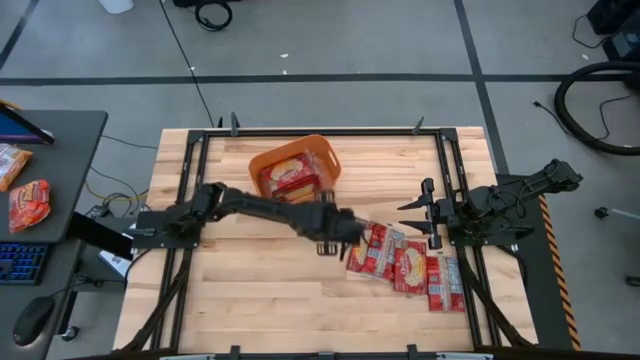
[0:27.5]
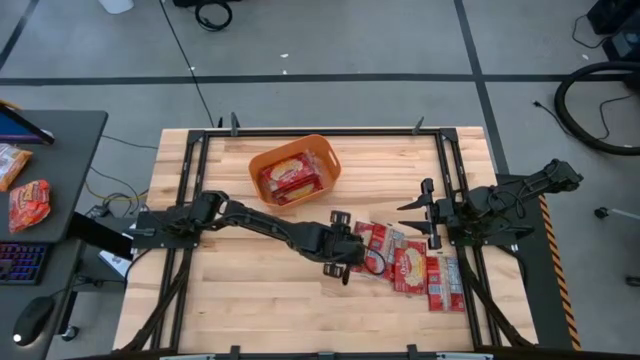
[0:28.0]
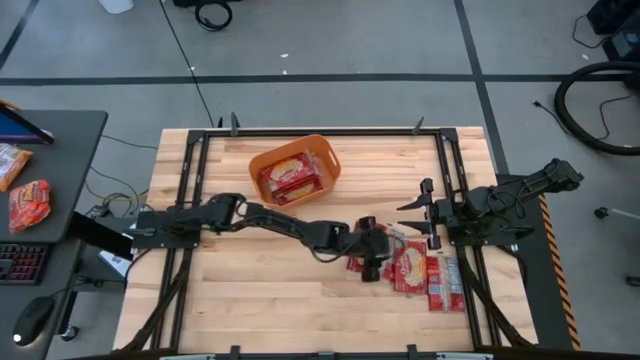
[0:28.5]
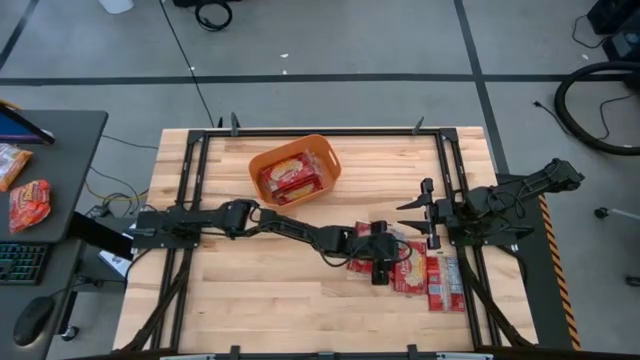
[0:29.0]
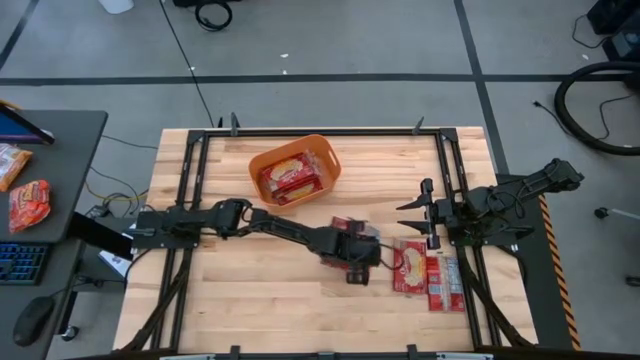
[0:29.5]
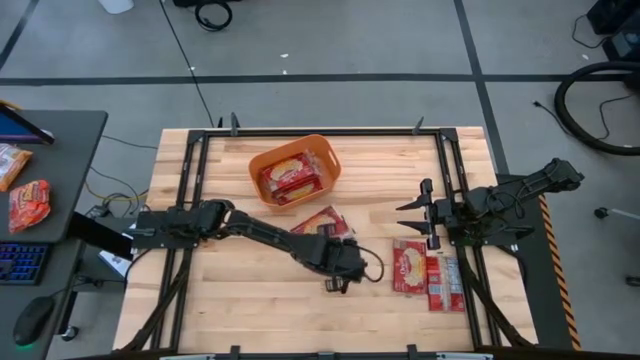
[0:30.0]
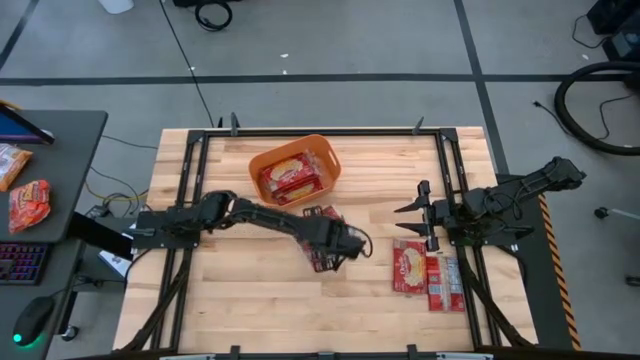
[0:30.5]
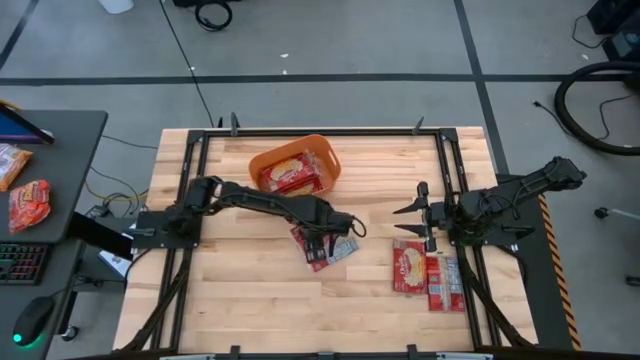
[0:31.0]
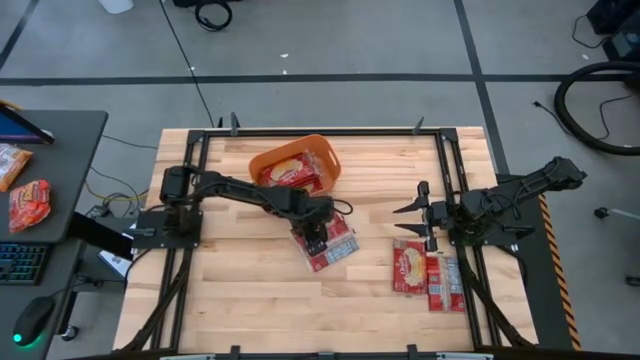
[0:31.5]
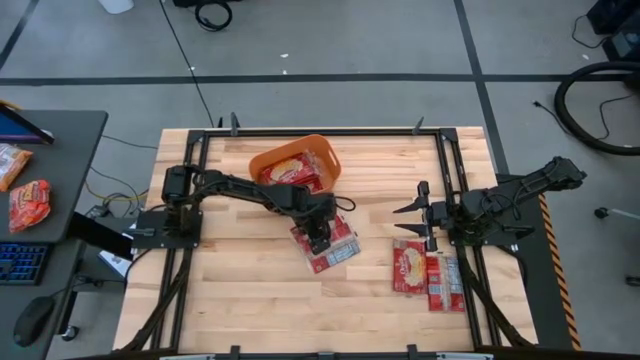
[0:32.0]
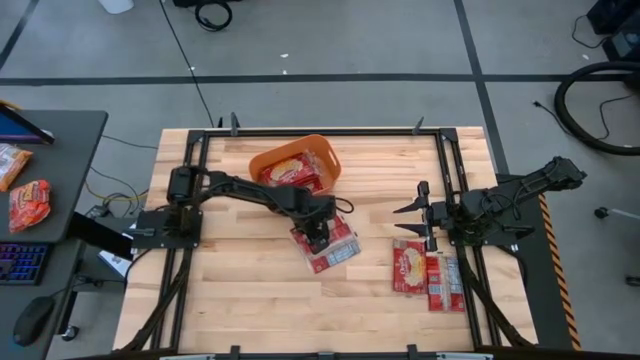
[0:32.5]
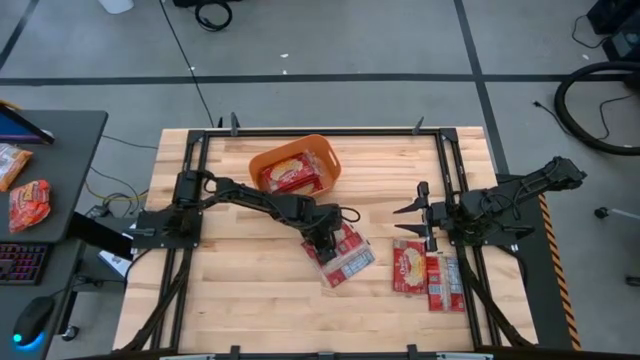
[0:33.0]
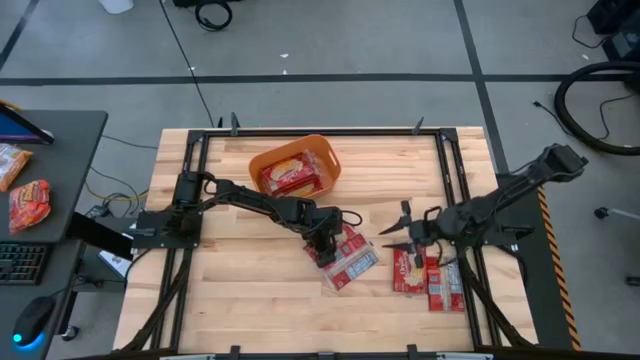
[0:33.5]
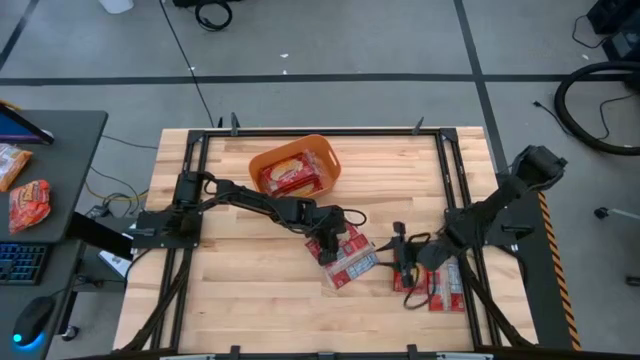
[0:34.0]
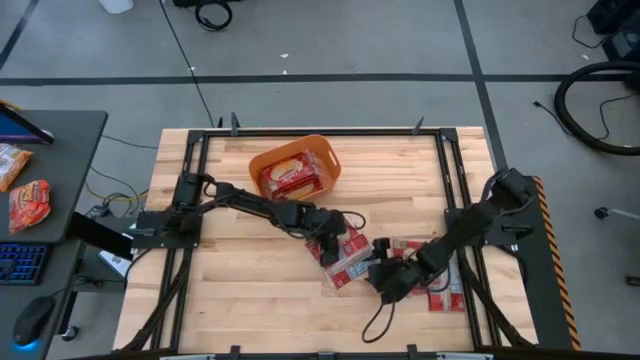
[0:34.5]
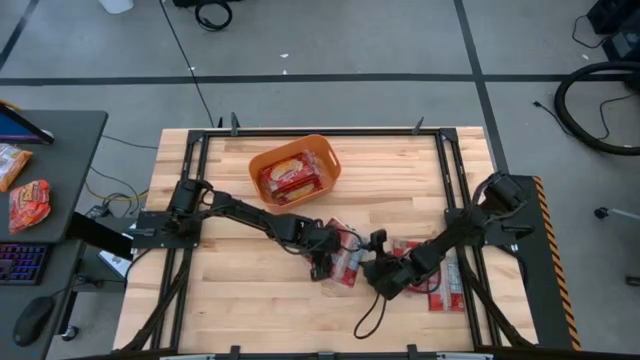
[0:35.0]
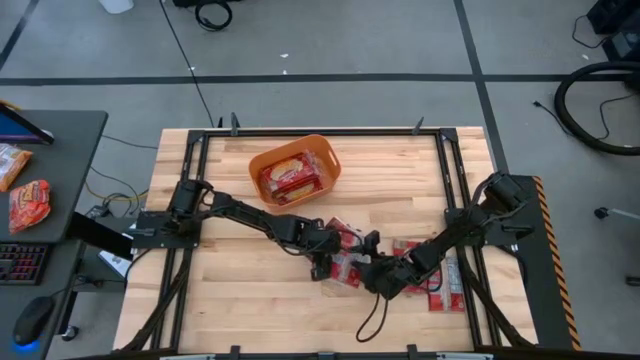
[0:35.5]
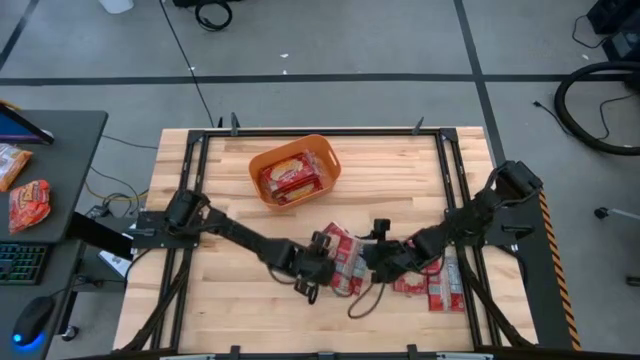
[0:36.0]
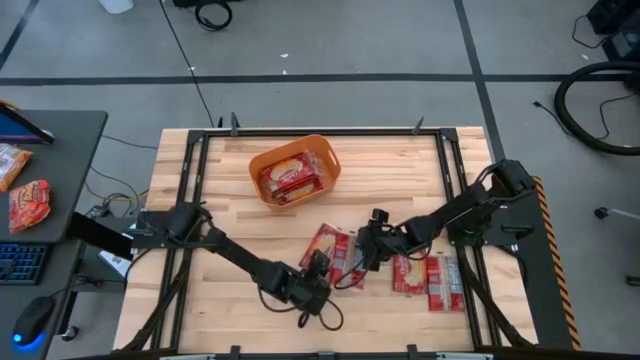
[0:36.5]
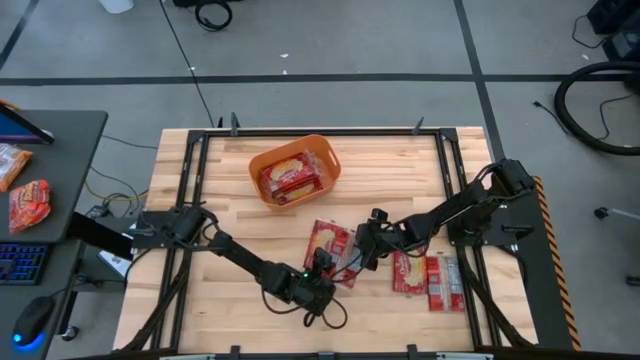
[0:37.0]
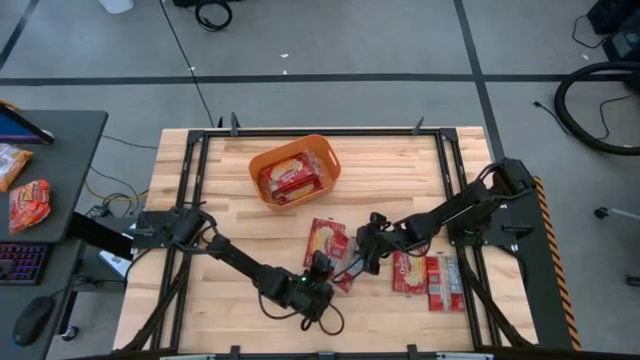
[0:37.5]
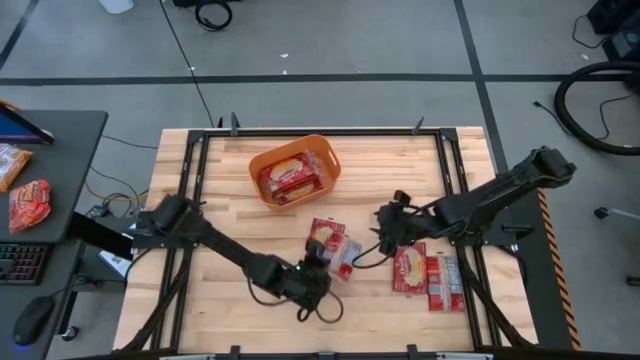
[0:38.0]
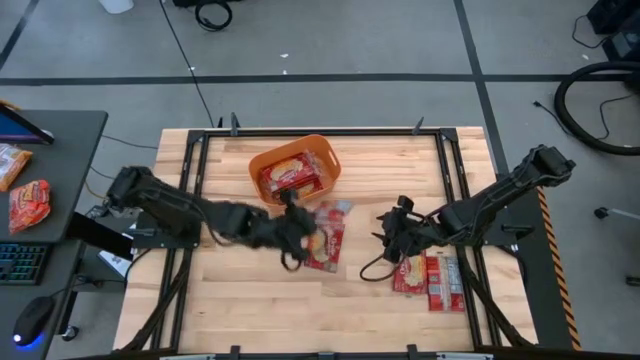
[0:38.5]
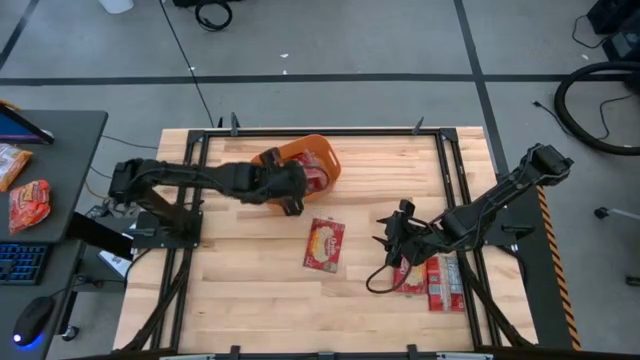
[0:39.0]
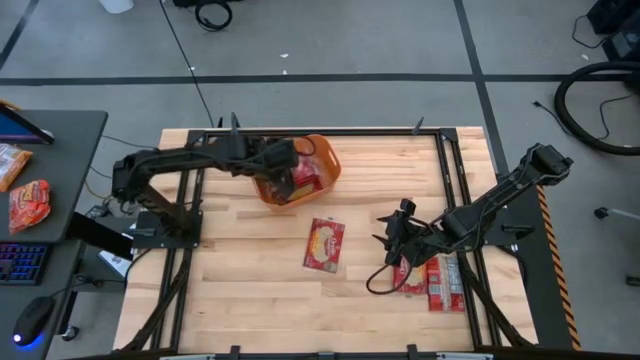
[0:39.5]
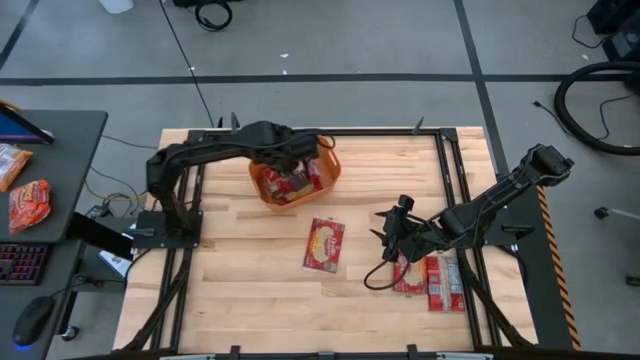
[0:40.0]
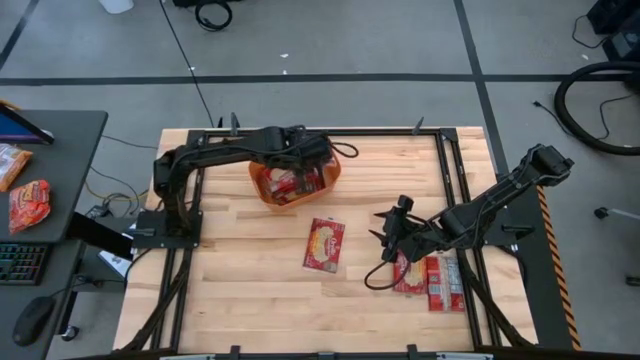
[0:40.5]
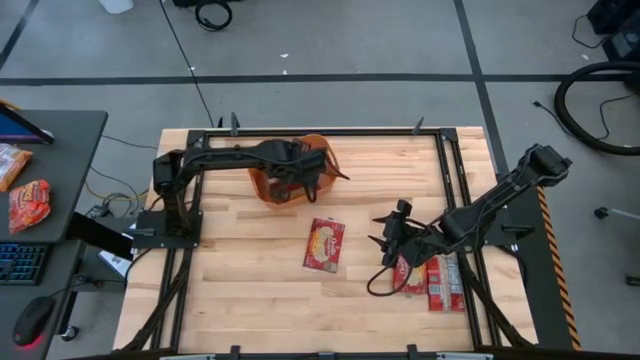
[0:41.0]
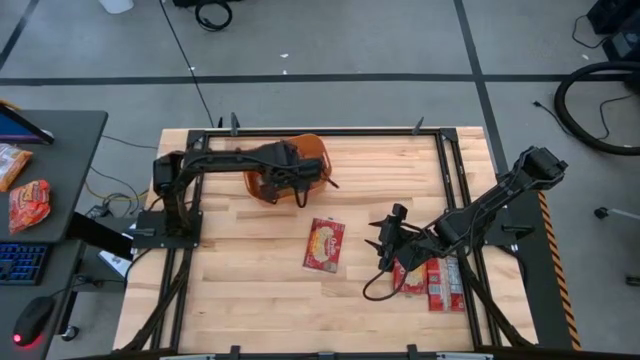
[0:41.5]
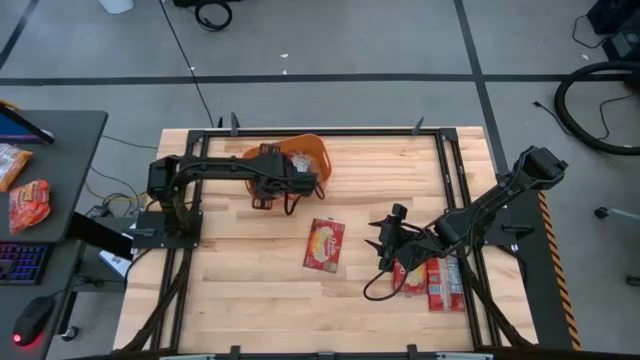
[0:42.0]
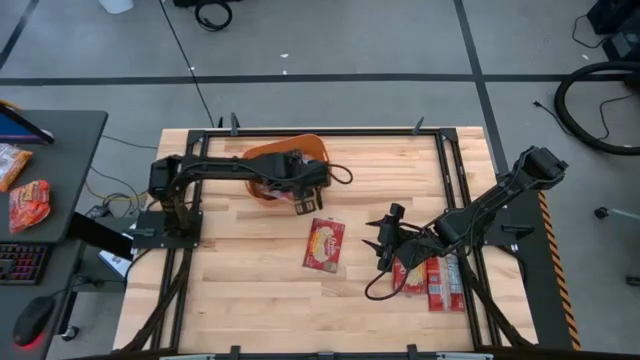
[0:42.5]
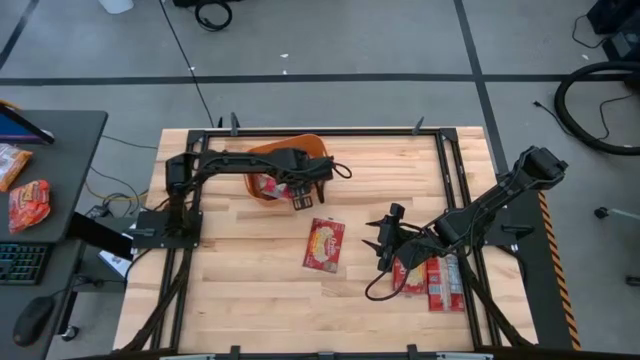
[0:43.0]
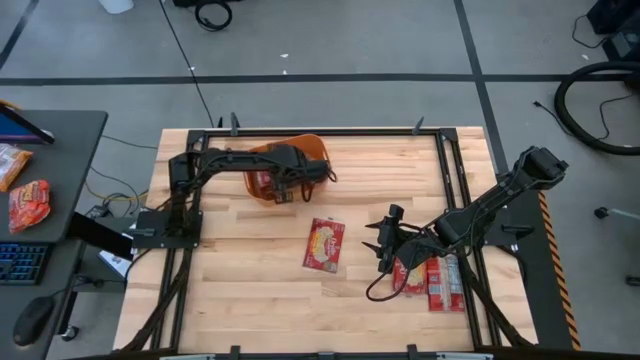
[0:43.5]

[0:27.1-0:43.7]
Task: Sort popcorn bags into baskets
Put the popcorn bag into the orange bin

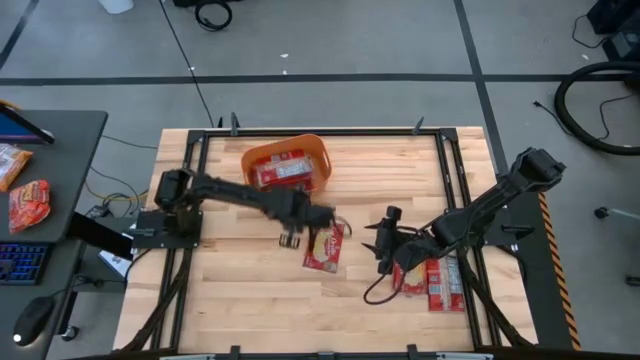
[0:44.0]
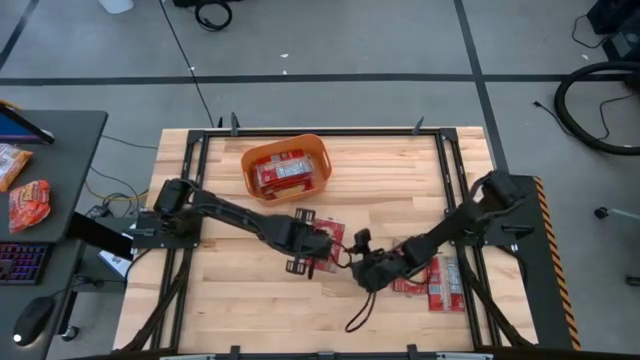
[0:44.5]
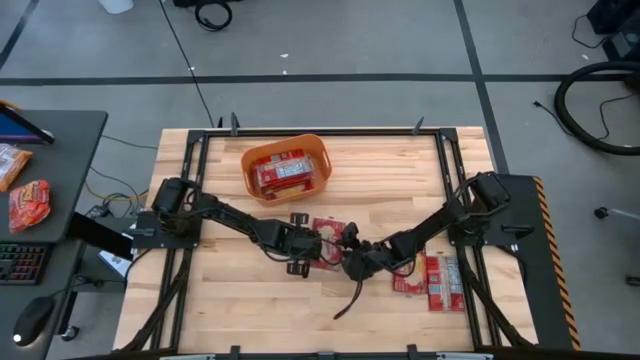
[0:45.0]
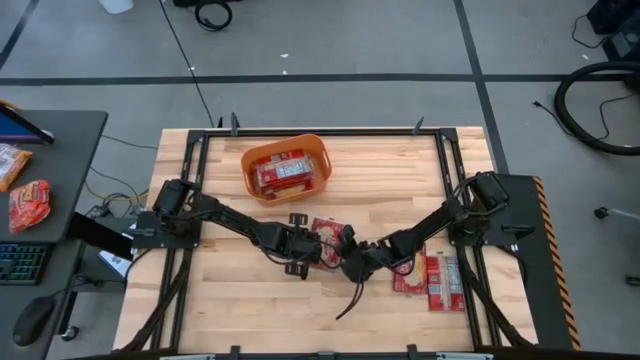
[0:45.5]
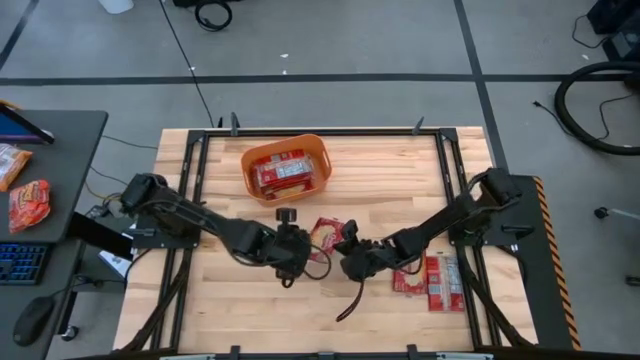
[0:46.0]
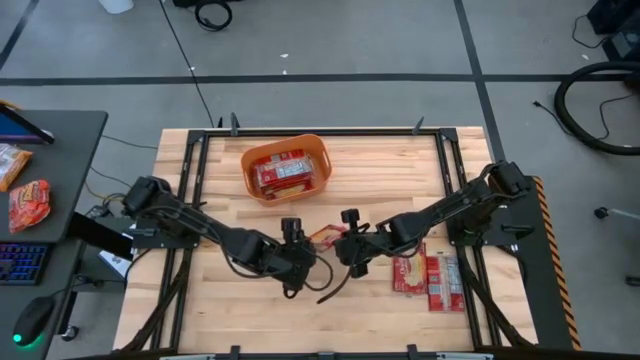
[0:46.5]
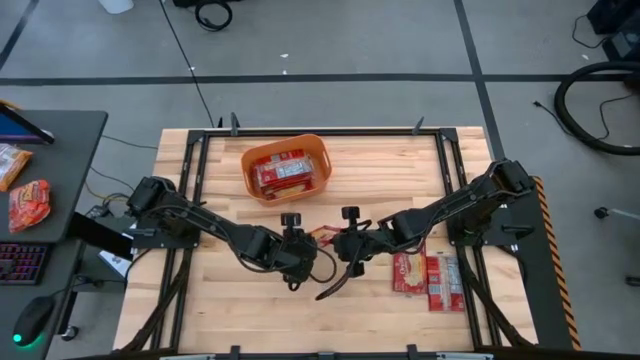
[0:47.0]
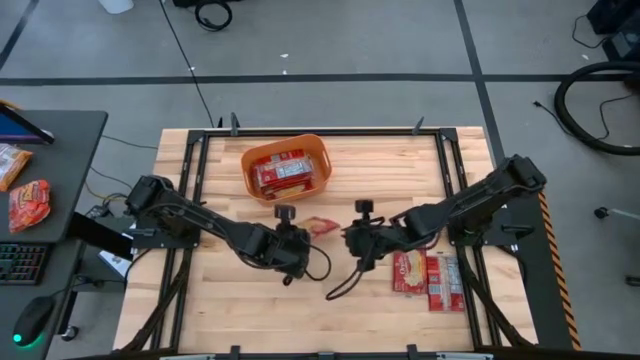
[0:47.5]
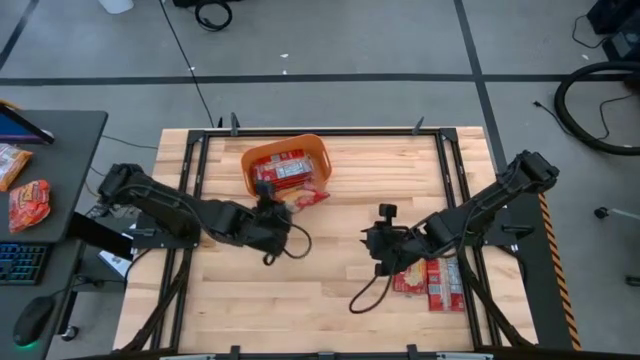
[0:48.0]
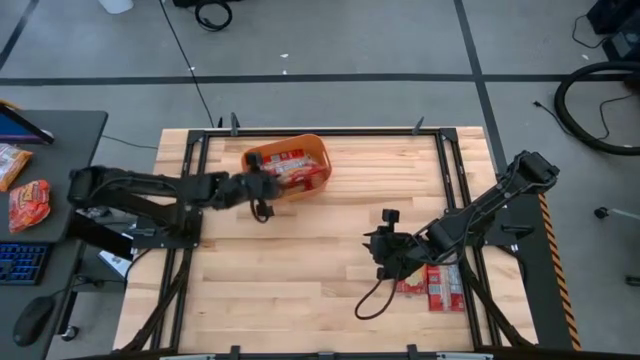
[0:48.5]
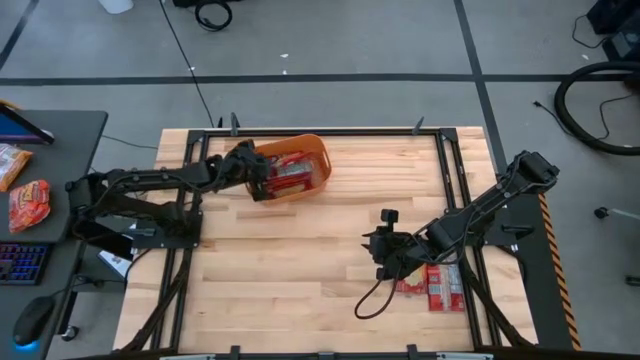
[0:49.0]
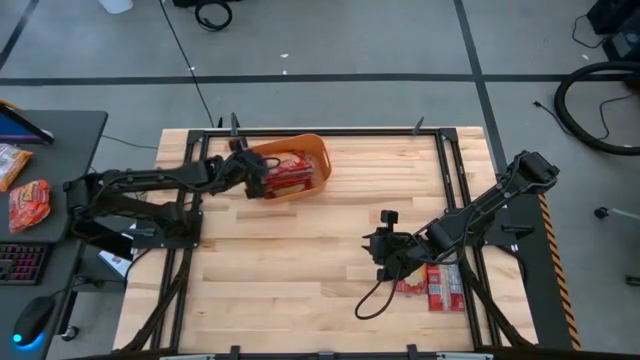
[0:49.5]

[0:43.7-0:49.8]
Put the popcorn bag into the orange bin
